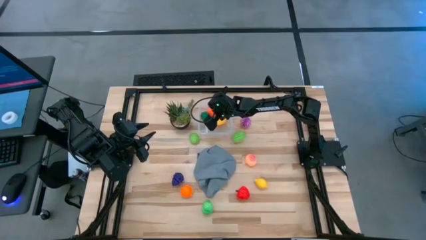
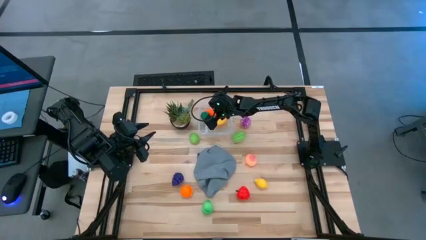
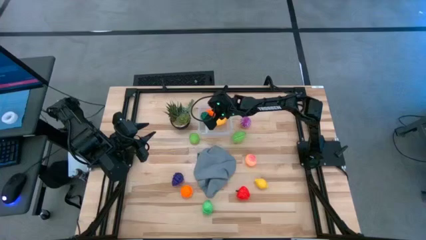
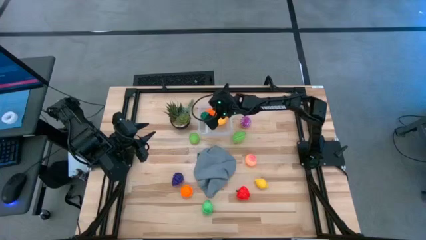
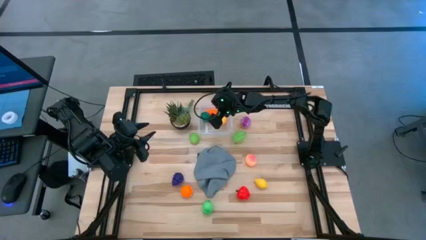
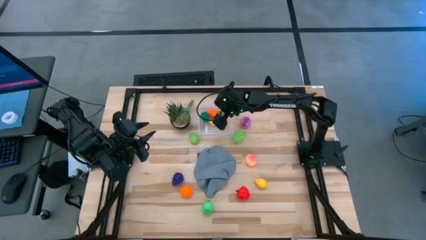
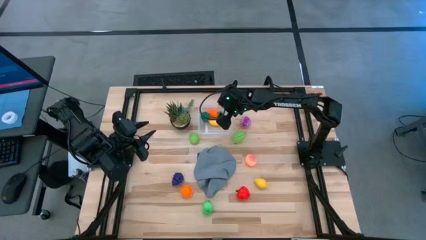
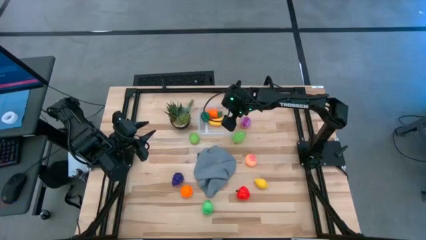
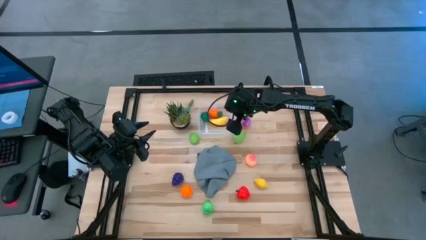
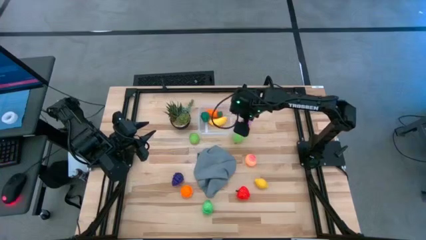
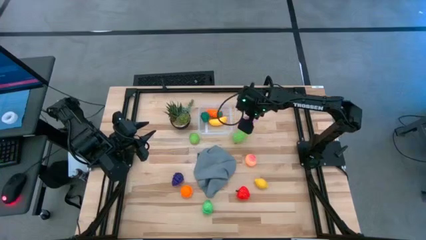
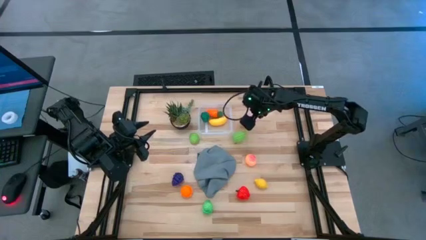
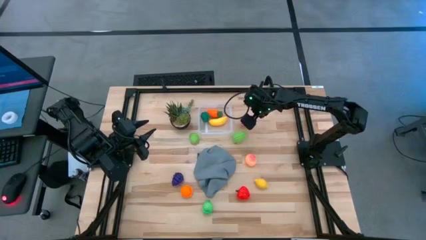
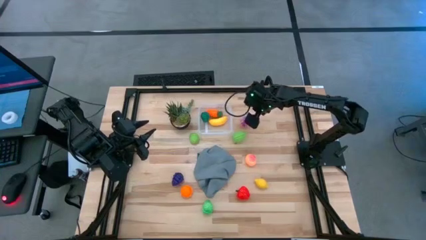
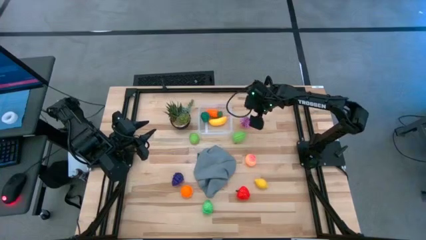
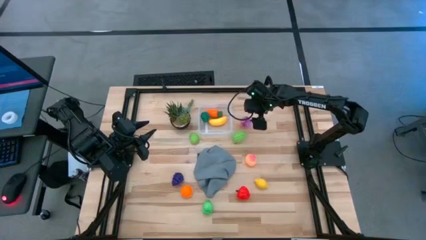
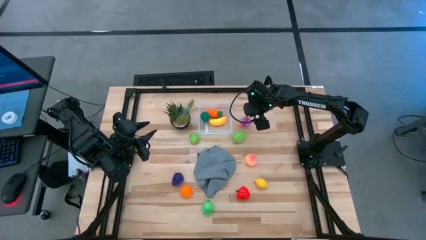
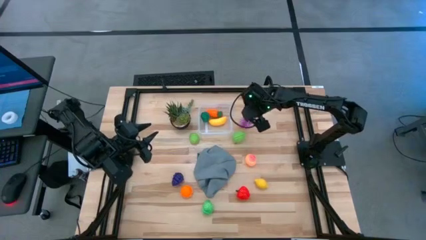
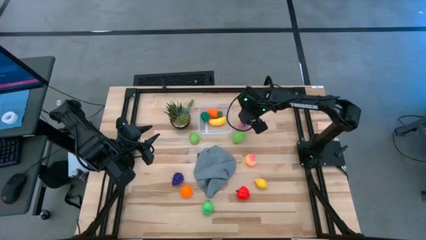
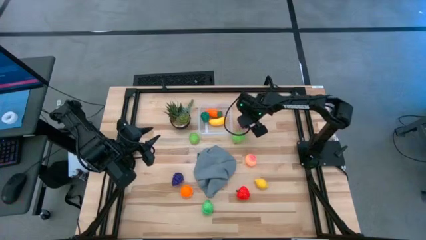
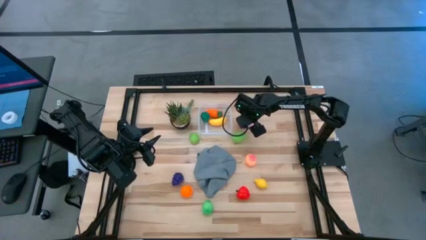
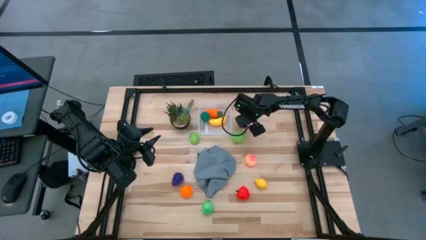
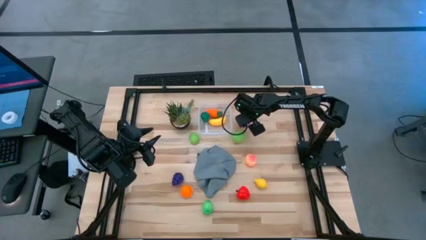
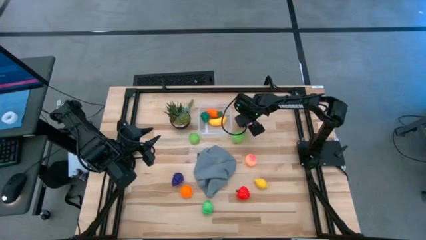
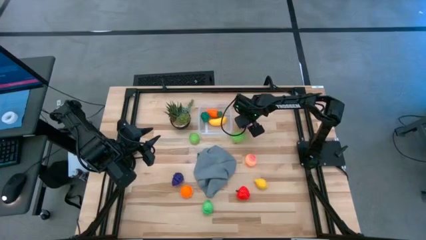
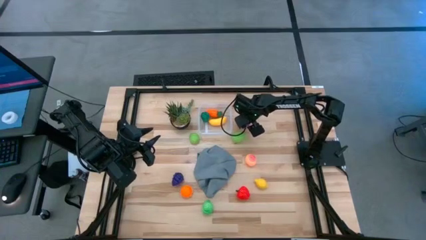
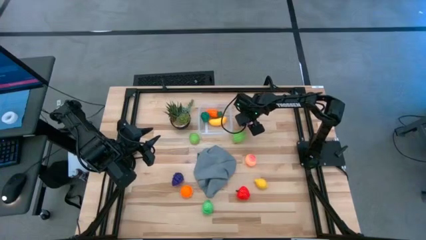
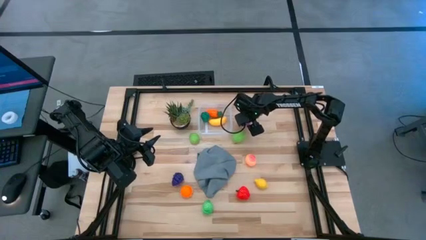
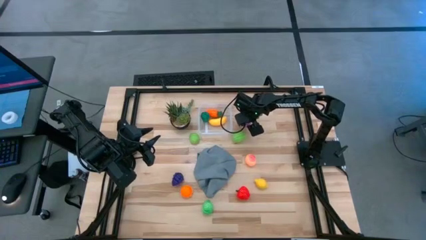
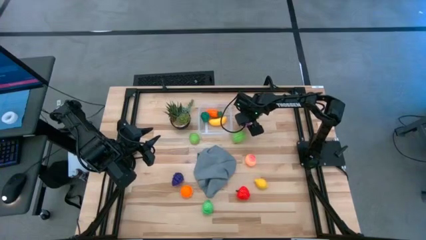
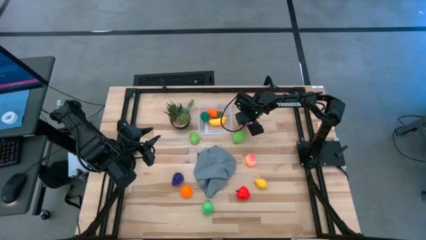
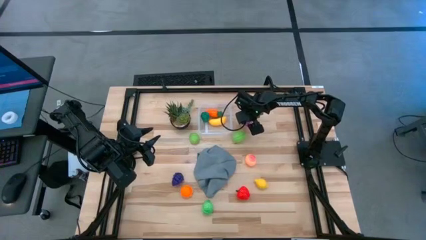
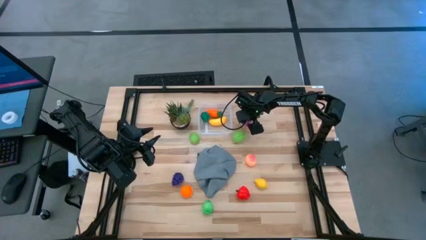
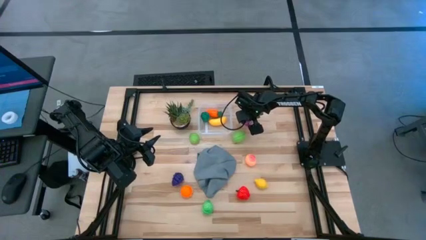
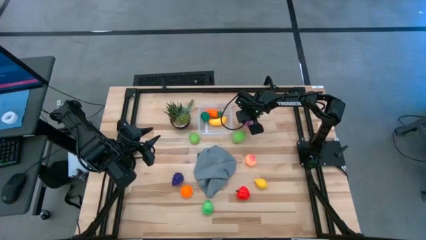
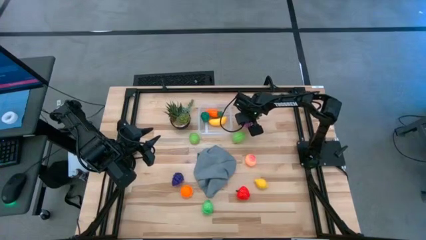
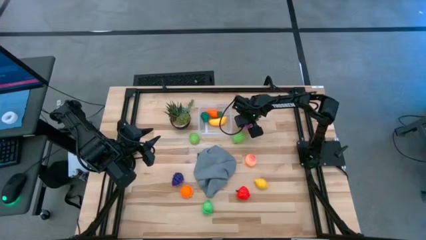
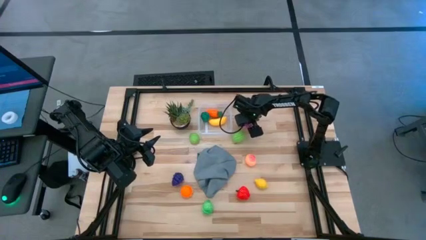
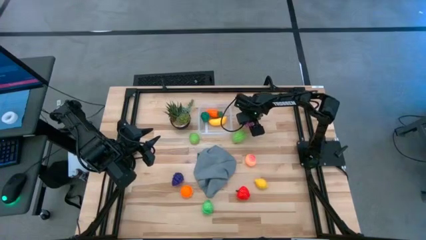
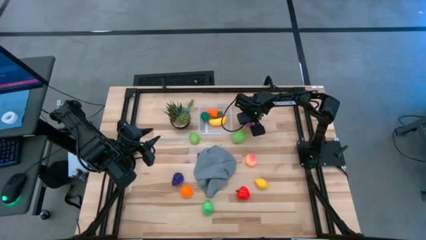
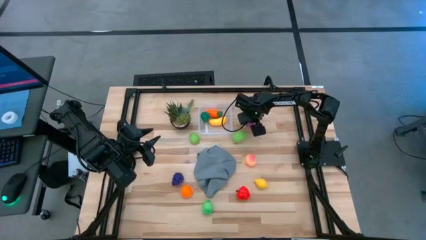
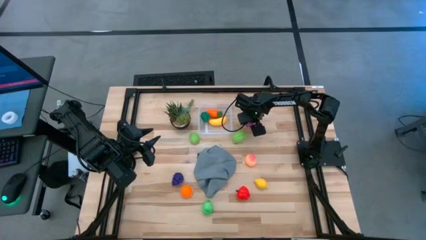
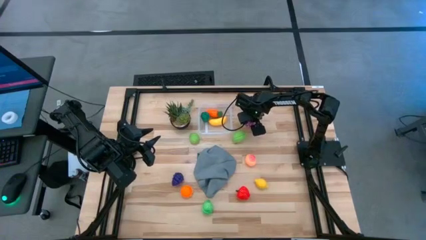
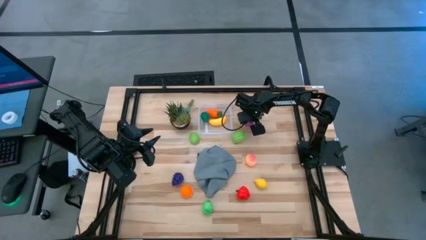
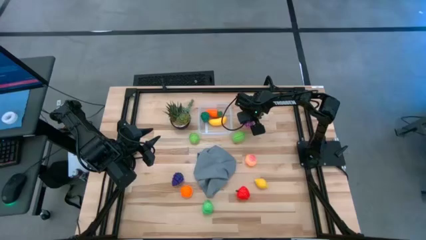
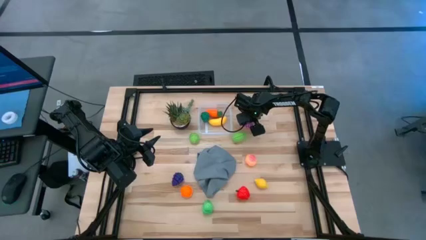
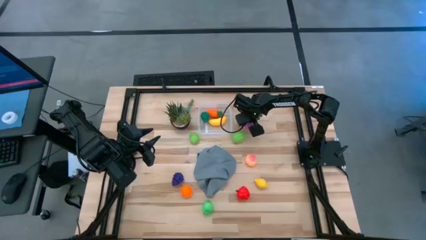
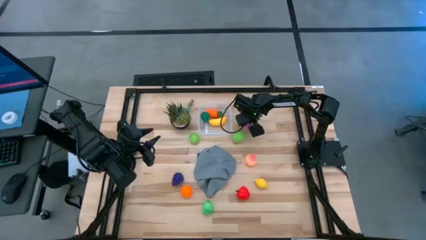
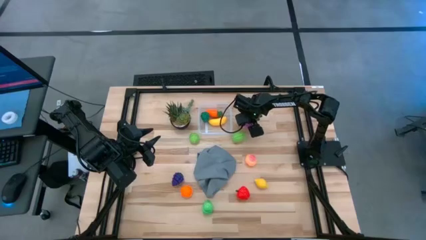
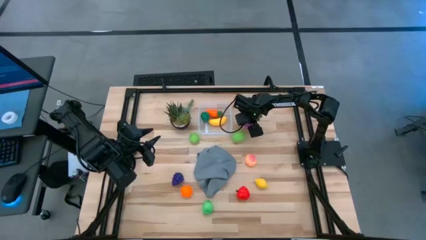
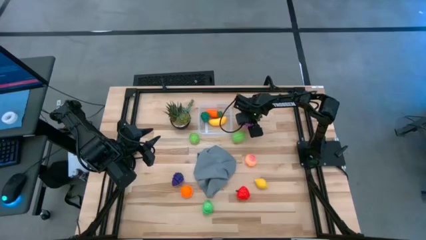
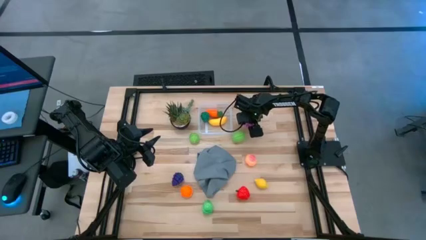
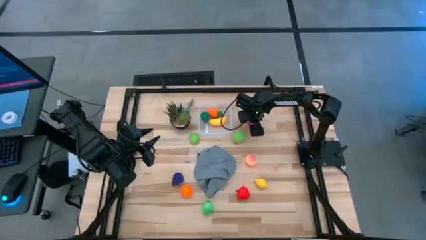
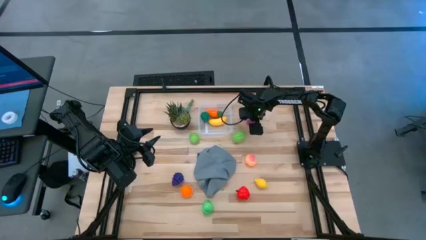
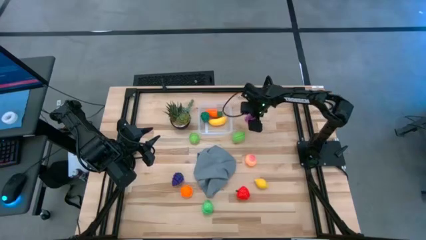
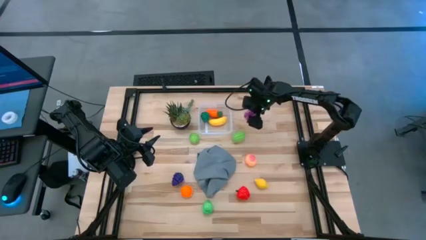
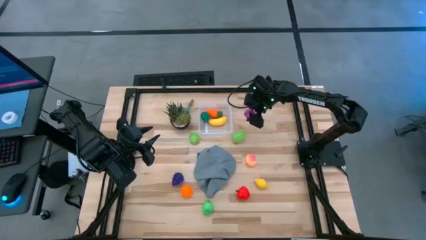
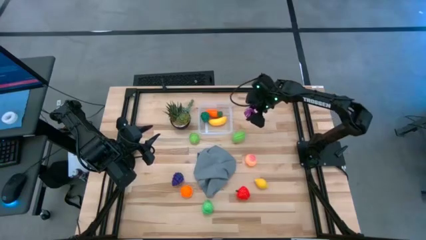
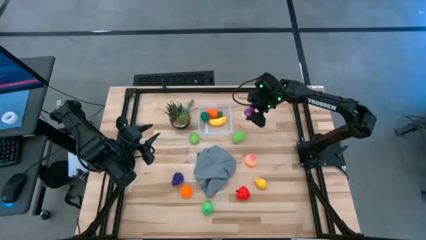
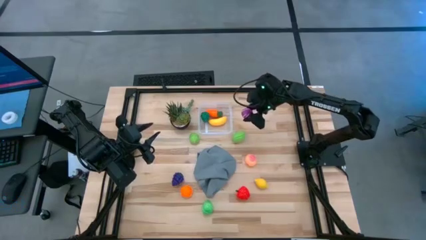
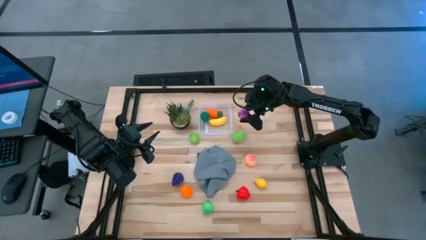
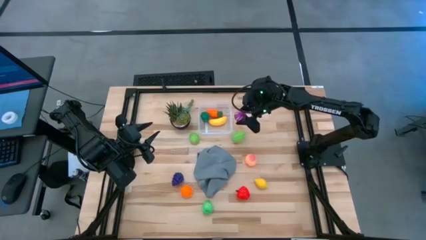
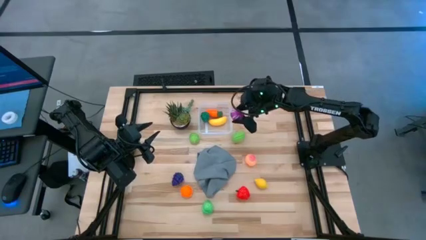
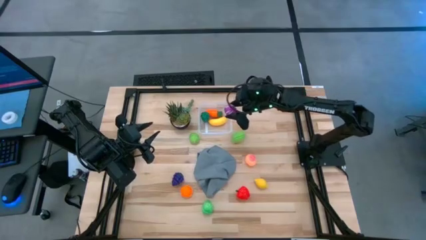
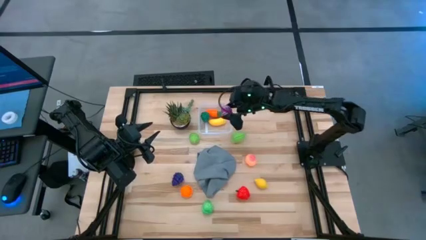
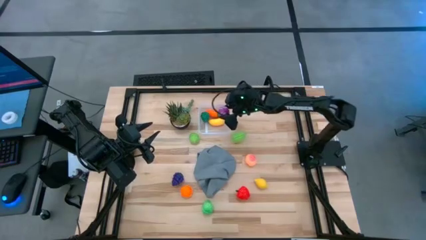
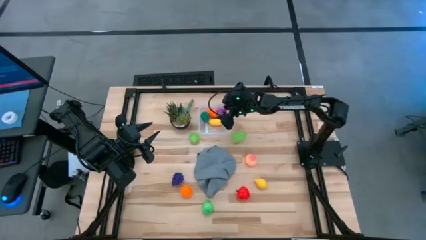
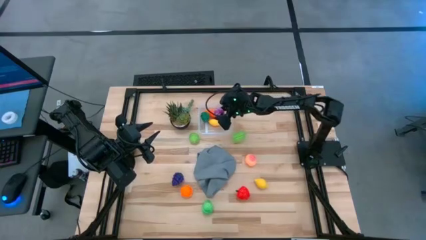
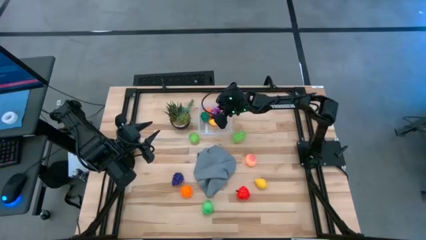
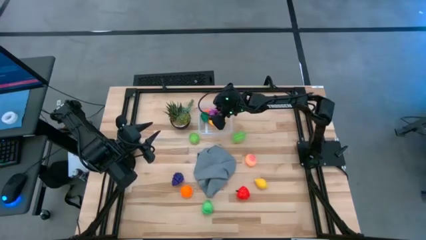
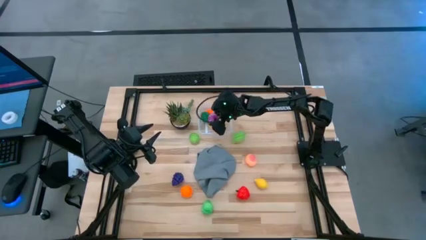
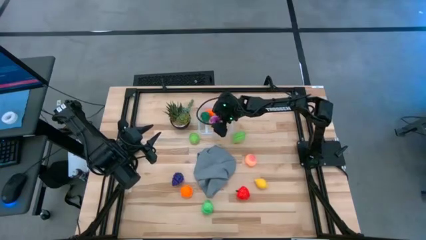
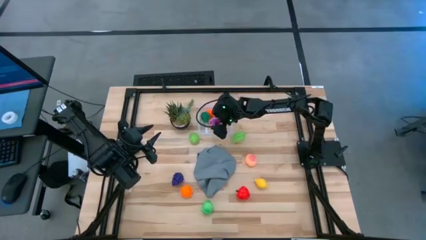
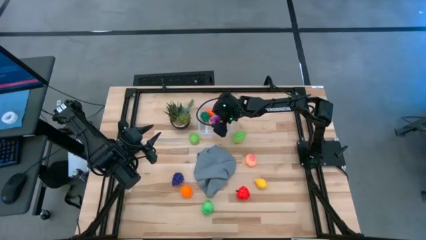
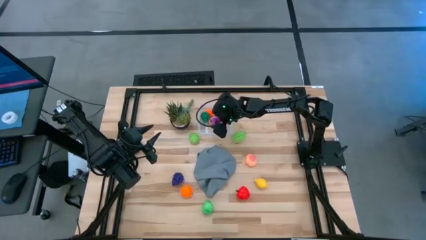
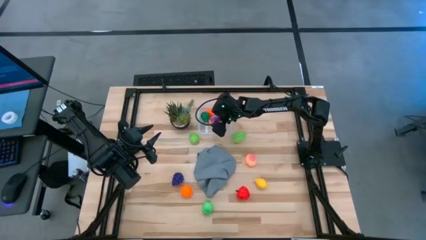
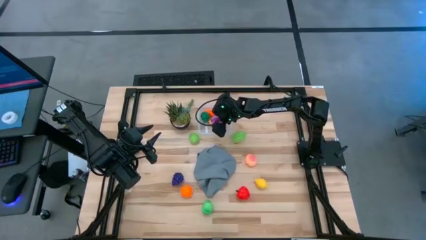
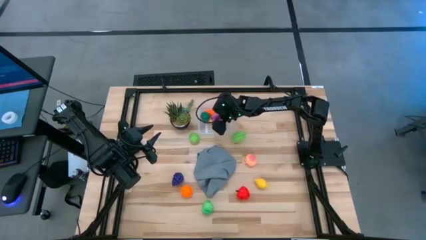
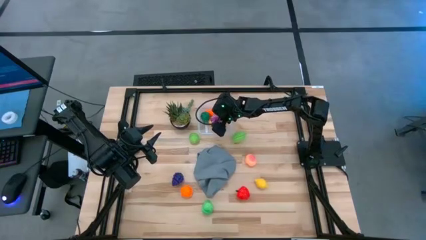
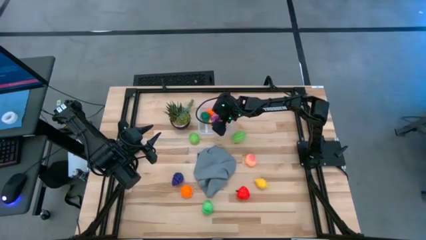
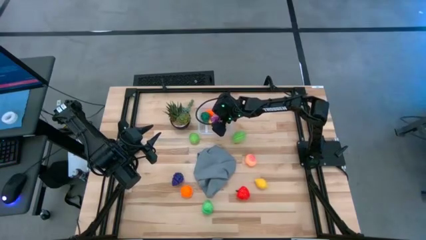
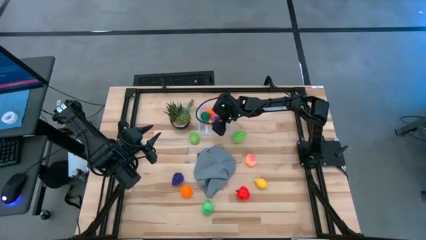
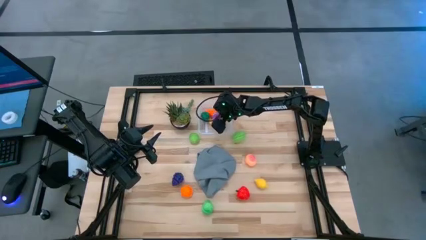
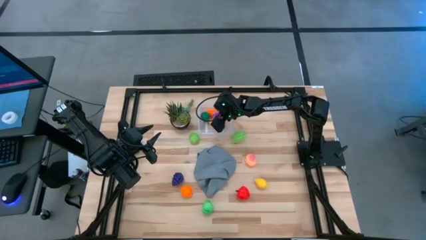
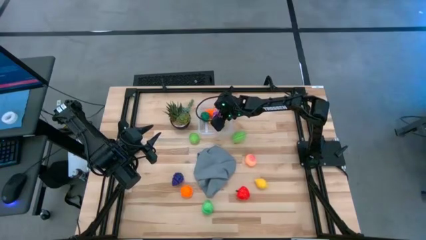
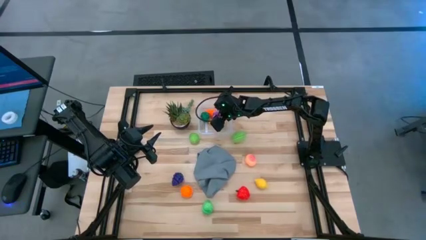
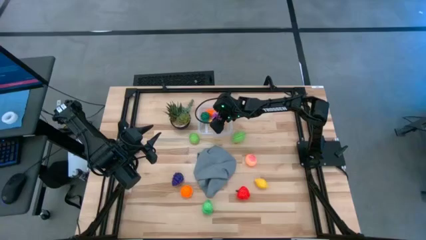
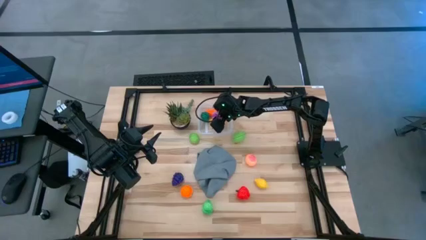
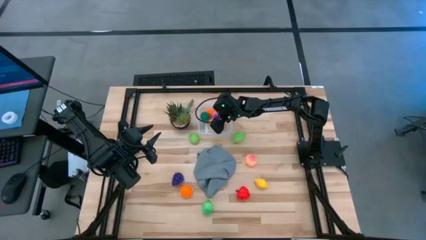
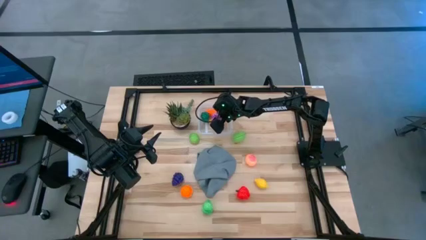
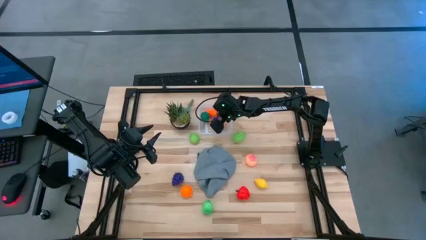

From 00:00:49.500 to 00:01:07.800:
Task: Pick and placing Produce into tupperware
Put the purple onion into the transparent container
